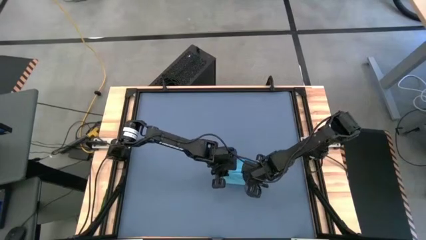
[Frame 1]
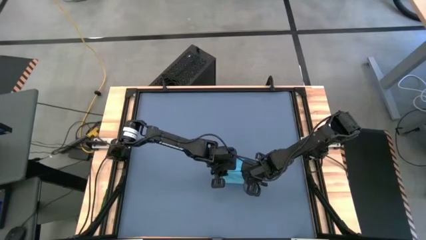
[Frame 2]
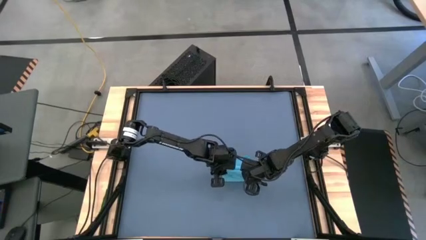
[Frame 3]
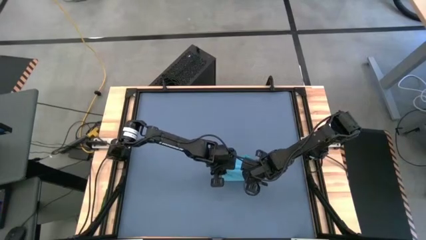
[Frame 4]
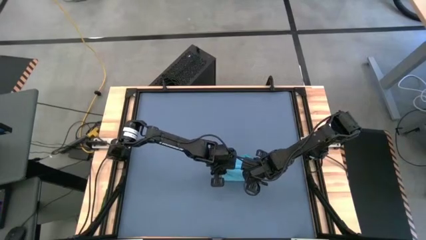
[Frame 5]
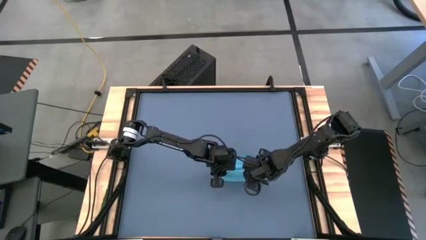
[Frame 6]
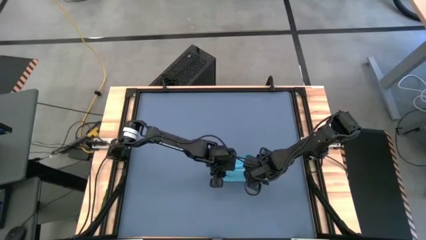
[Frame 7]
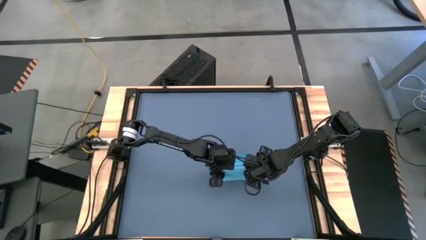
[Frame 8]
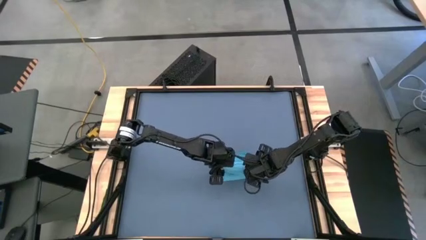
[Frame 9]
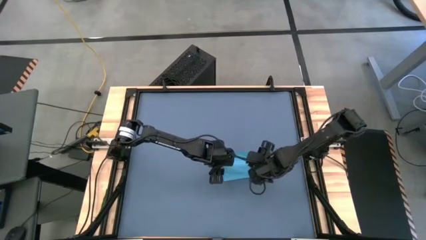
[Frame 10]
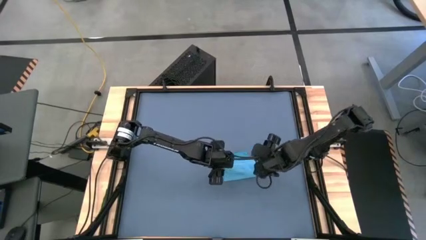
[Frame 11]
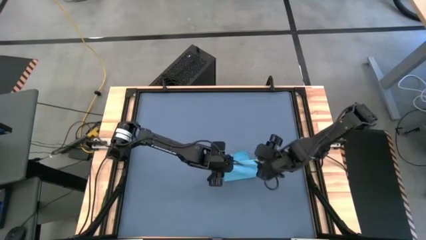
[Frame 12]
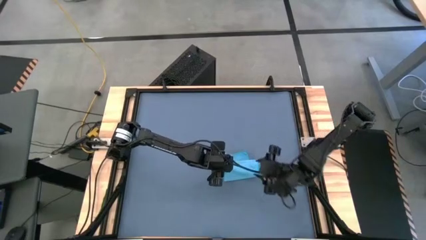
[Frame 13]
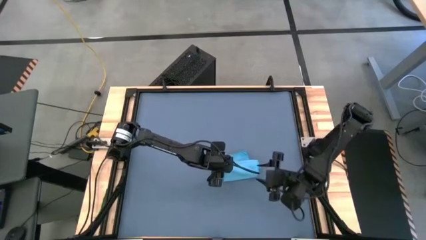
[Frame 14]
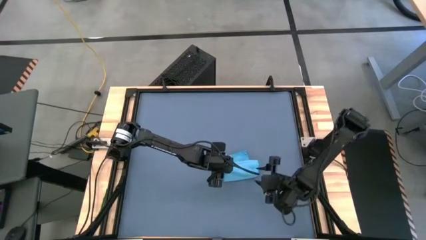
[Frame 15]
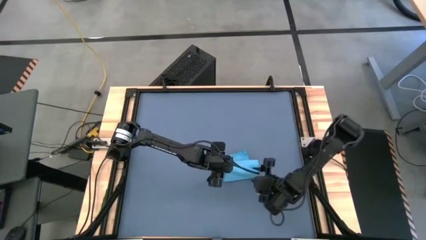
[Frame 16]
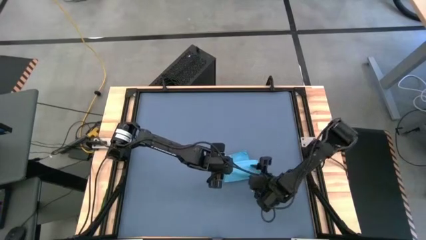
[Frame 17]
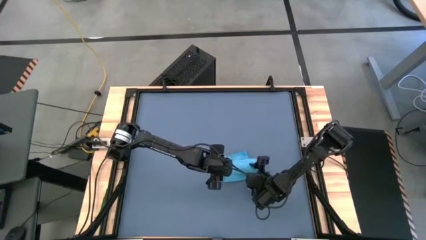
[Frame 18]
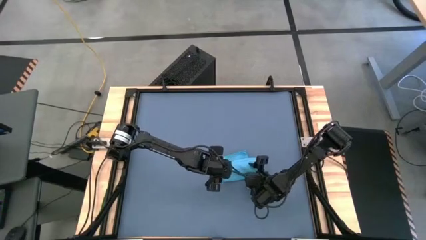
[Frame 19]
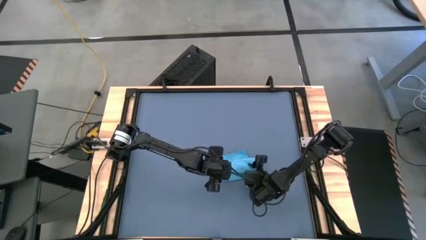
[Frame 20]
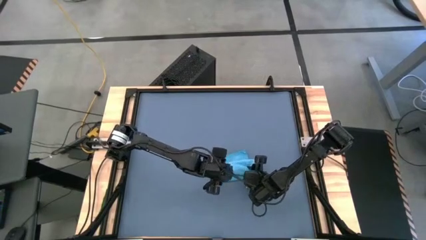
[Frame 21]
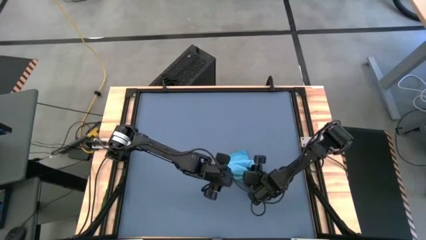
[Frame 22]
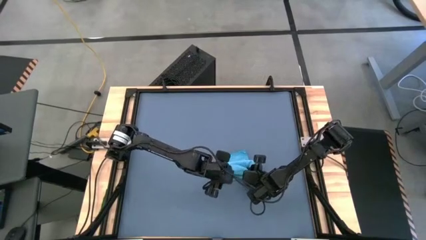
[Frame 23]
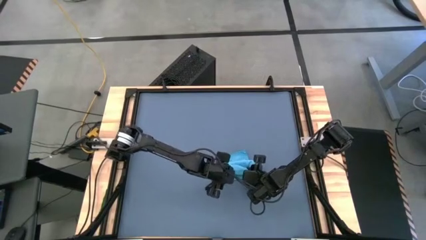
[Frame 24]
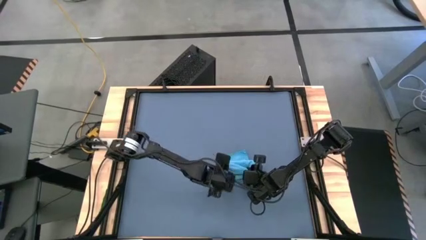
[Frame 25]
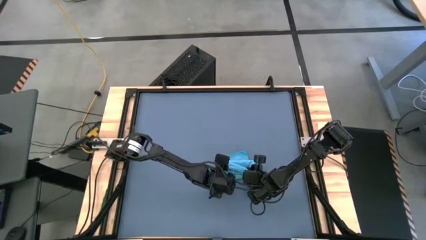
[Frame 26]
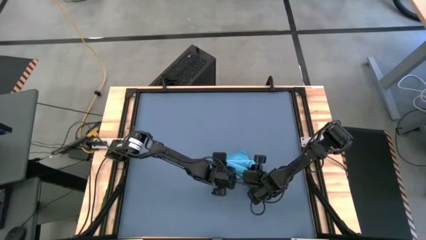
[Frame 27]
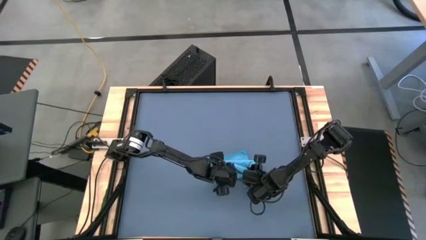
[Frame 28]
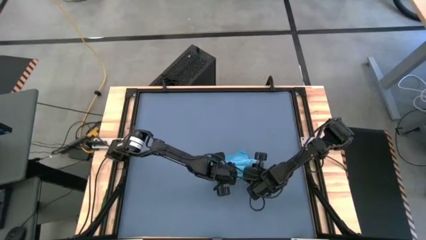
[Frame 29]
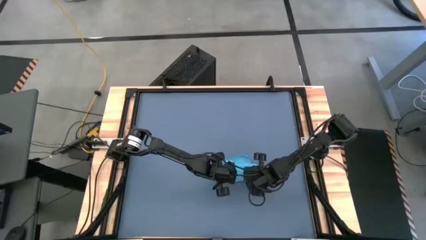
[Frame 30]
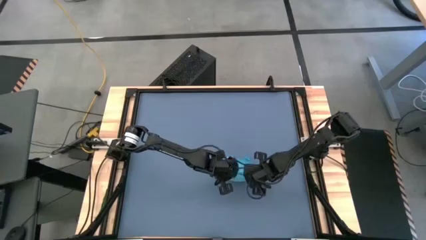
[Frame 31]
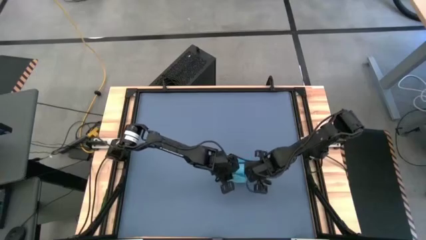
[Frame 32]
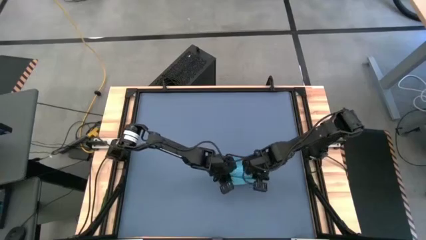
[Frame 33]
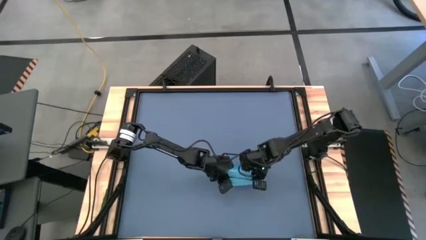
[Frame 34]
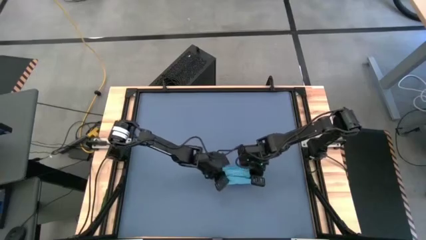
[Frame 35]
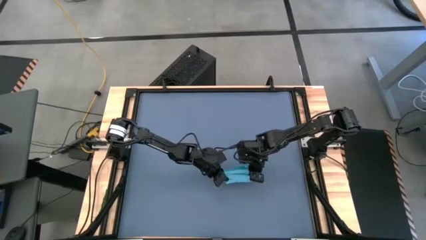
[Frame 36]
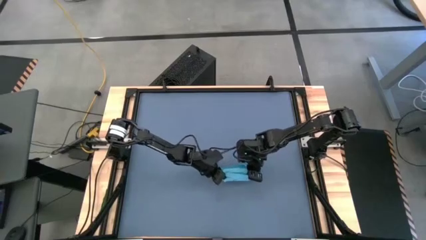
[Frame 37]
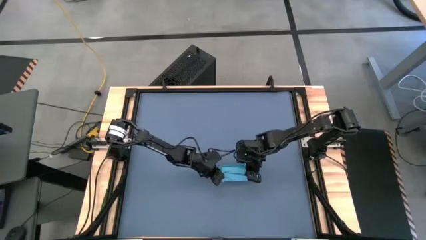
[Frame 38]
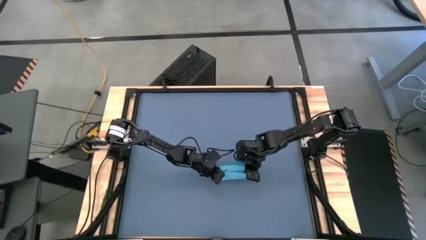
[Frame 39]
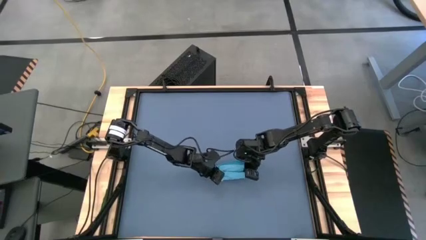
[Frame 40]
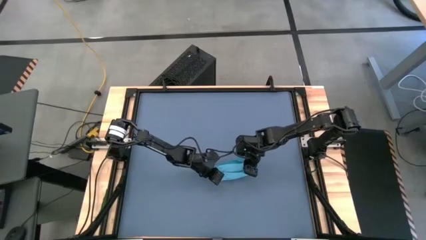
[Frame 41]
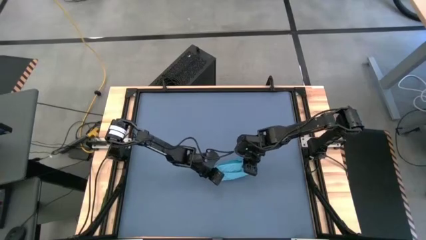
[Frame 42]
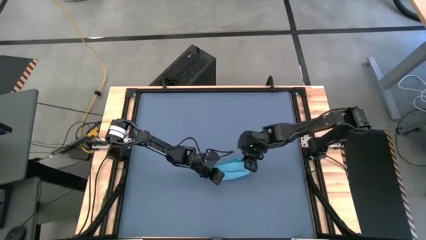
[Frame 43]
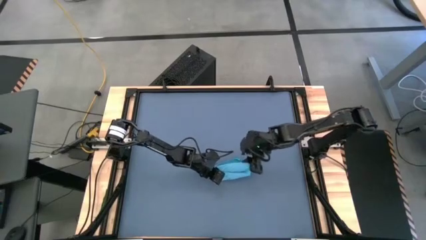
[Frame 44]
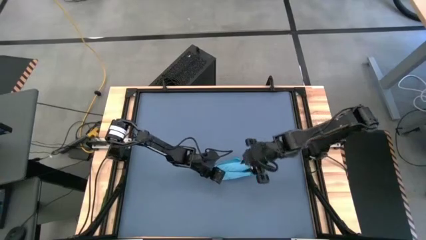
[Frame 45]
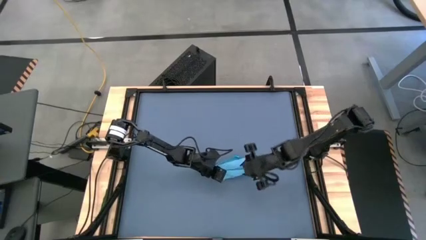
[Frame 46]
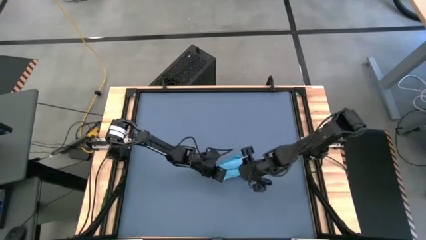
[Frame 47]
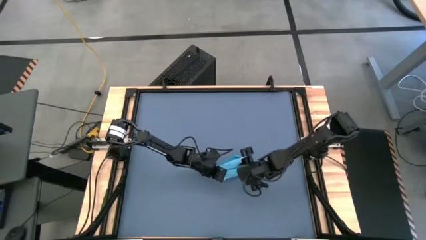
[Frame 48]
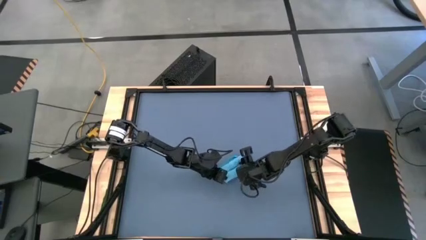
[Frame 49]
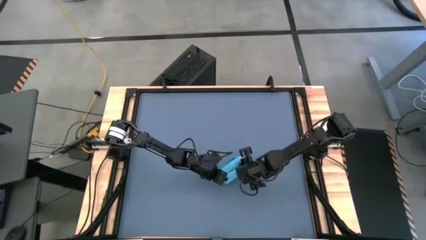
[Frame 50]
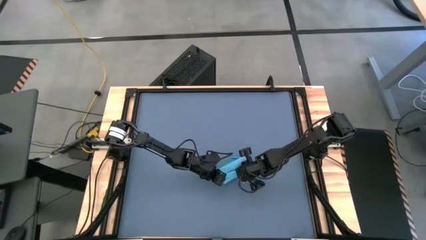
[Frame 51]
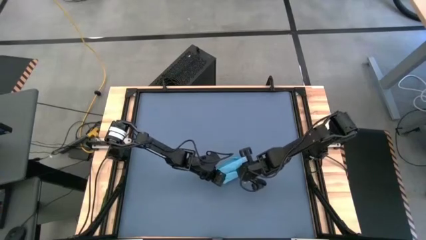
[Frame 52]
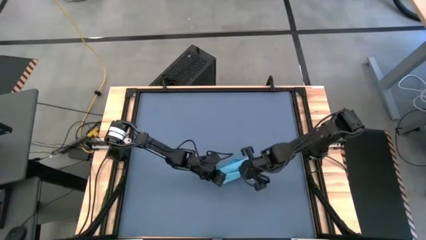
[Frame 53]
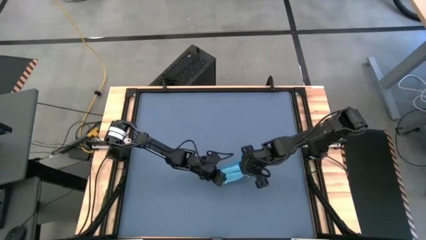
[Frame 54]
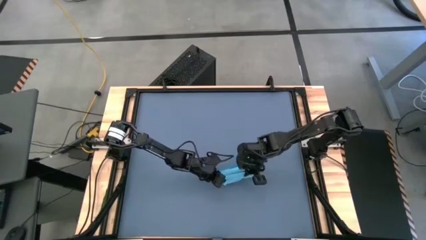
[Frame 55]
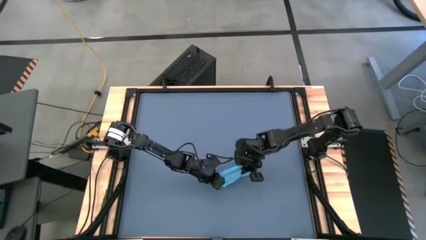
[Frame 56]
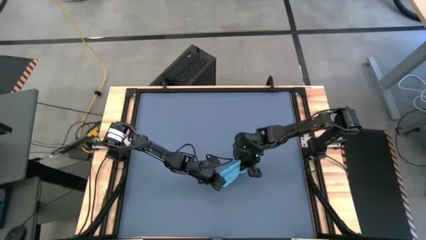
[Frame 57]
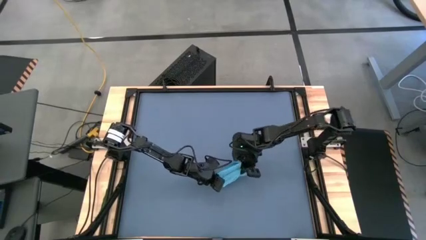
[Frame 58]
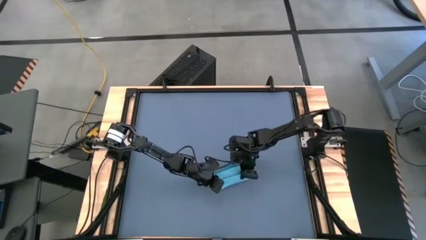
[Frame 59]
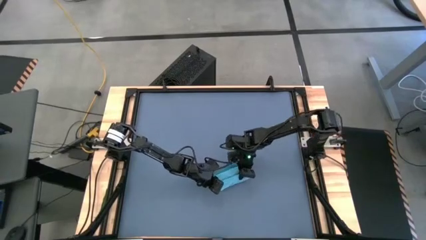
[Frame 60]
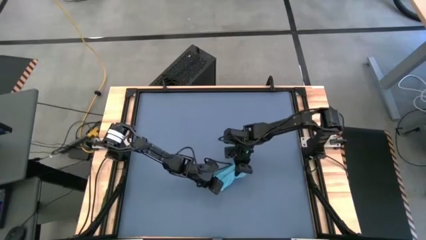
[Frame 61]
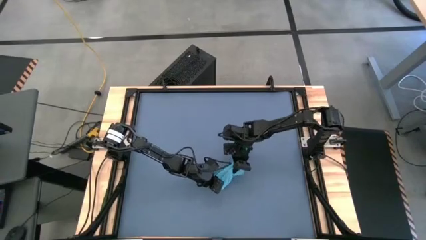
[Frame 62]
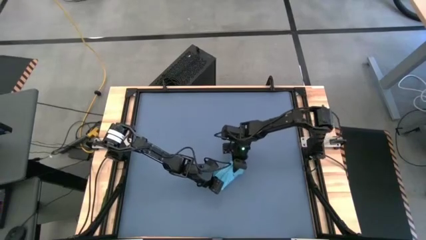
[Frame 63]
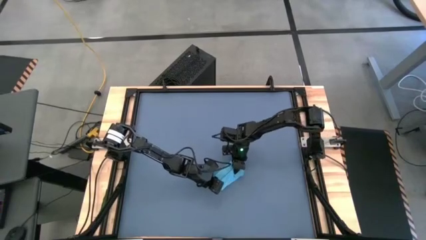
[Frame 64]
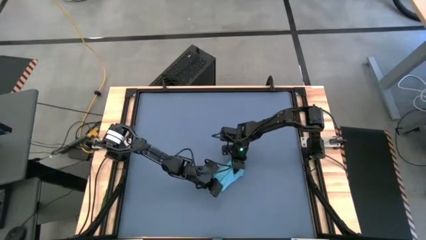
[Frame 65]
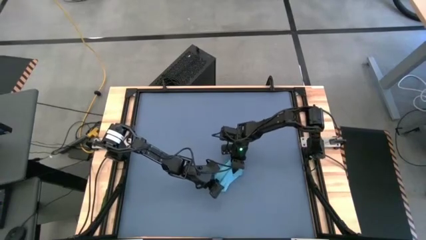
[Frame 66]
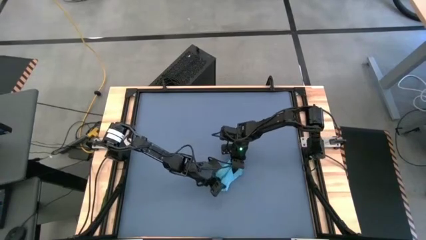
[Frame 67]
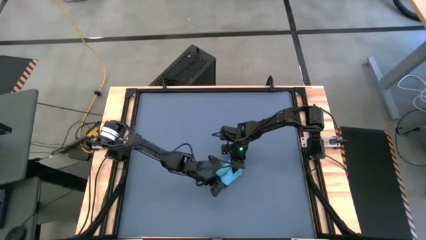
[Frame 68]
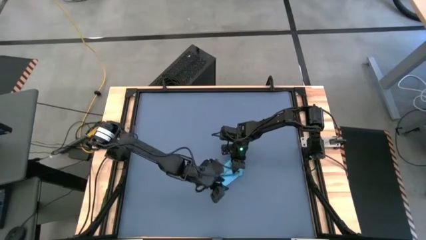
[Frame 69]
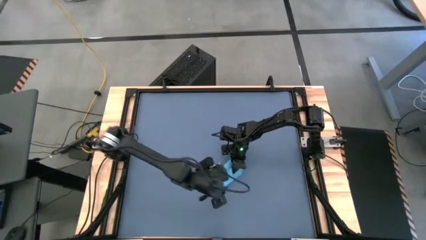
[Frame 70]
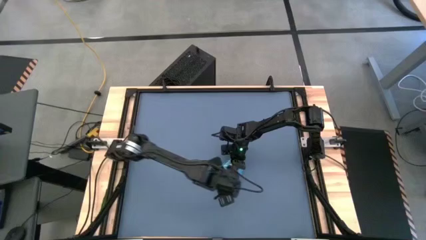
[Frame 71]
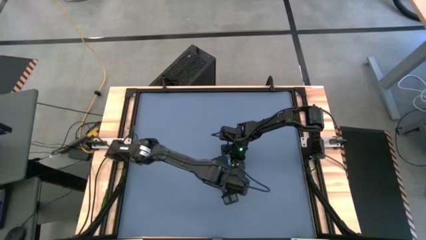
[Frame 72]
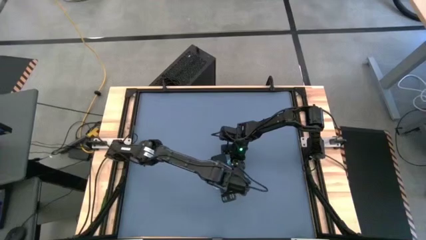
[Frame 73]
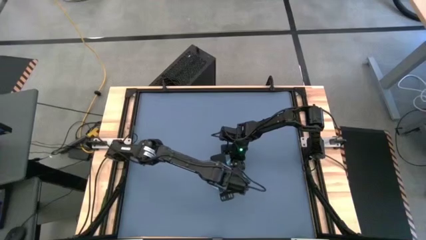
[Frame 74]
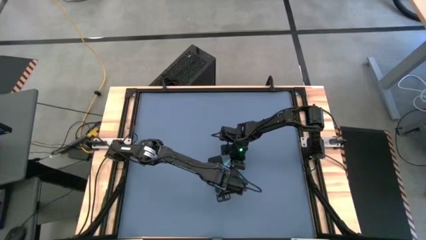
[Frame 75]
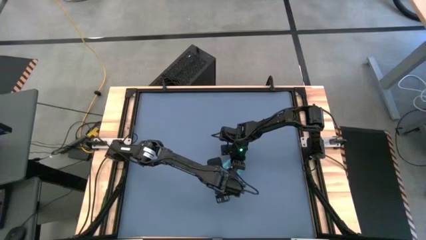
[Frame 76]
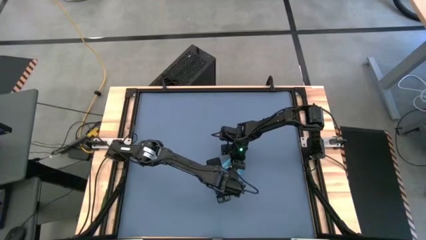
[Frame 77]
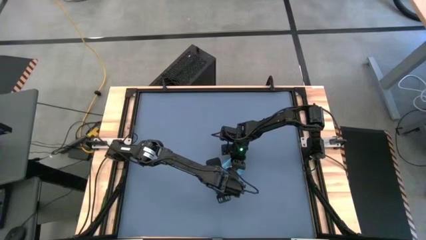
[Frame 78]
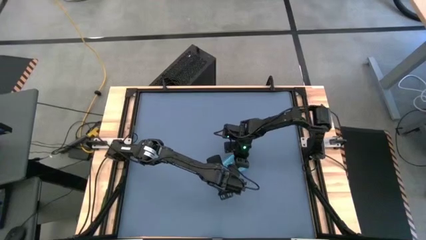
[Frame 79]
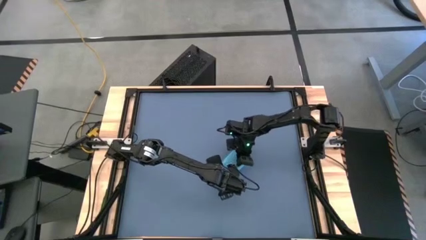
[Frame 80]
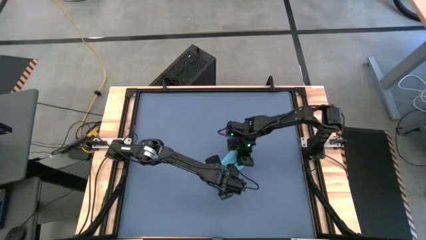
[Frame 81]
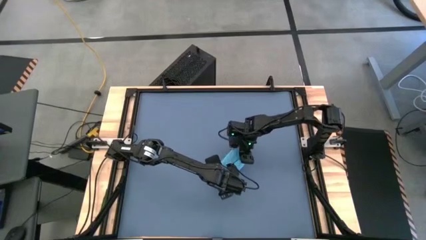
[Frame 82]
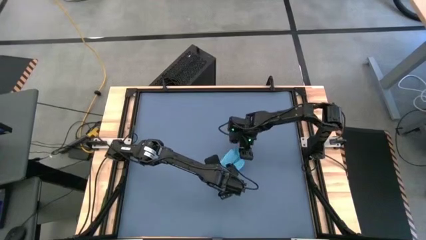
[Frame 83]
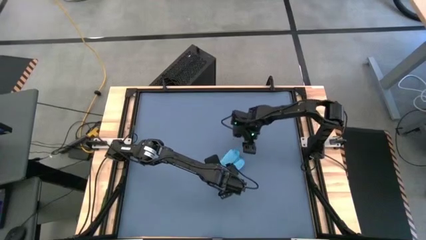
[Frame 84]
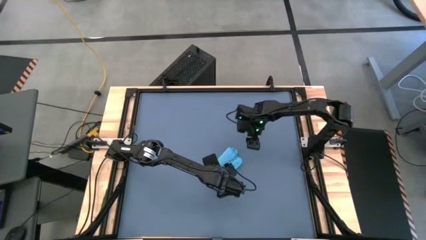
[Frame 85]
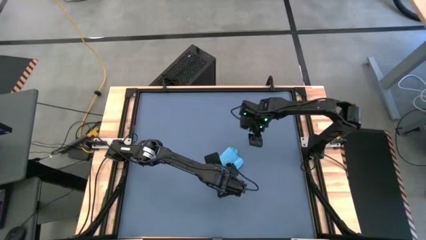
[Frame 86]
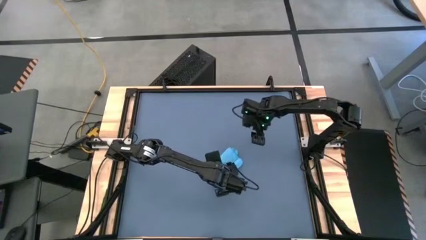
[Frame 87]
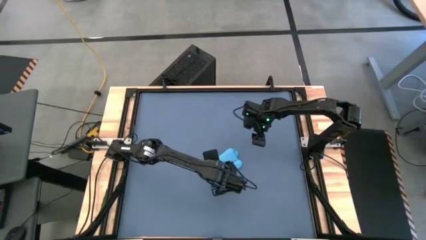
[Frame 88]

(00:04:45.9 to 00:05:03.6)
Task: Roll towel
Roll the blue microfiber towel
